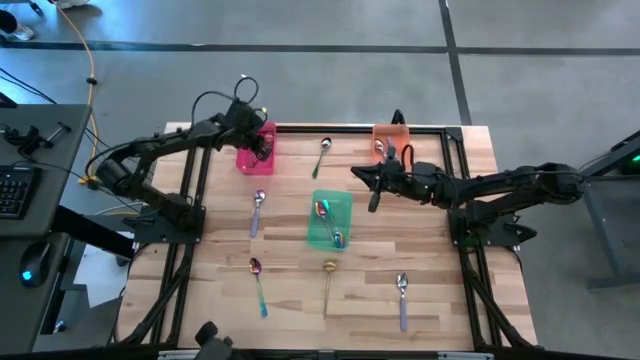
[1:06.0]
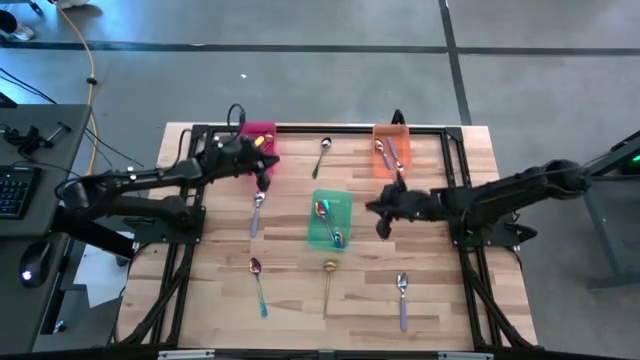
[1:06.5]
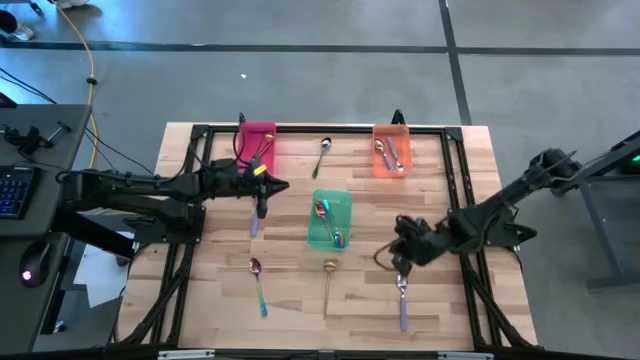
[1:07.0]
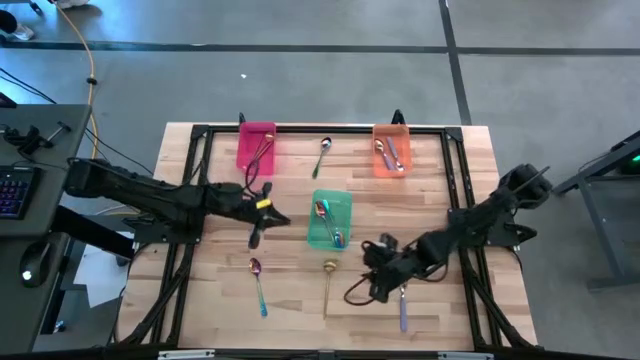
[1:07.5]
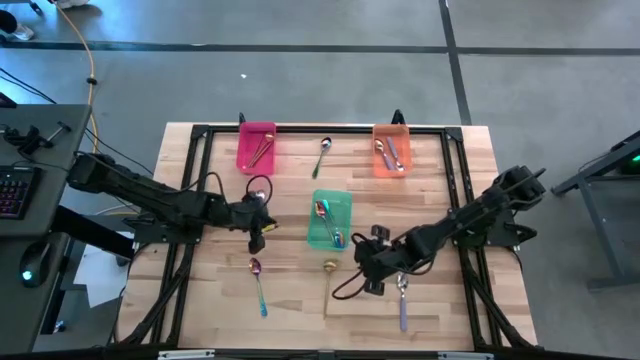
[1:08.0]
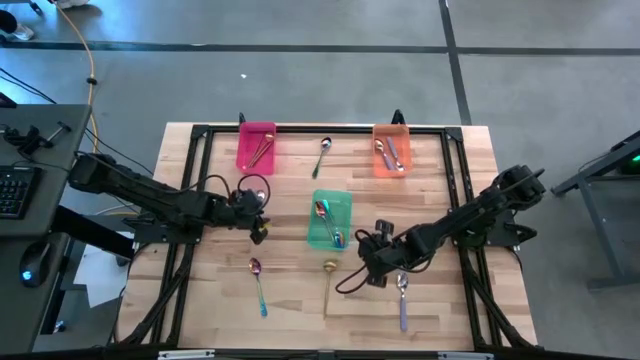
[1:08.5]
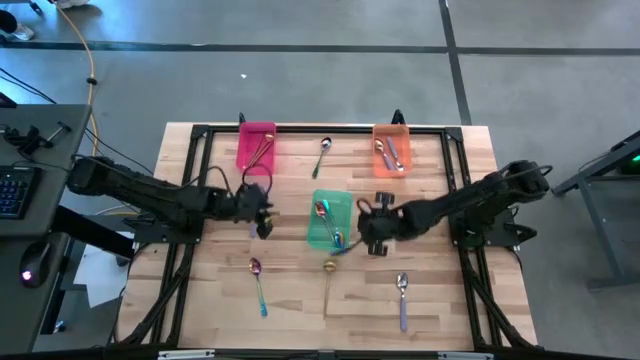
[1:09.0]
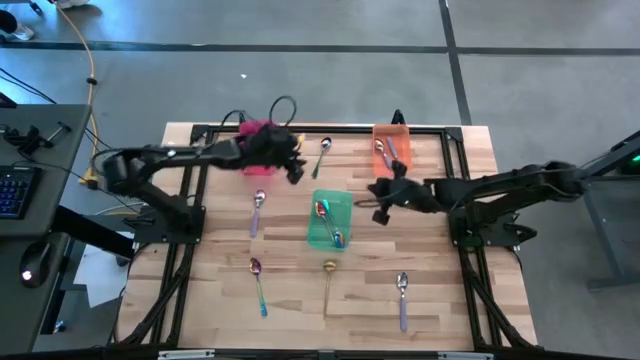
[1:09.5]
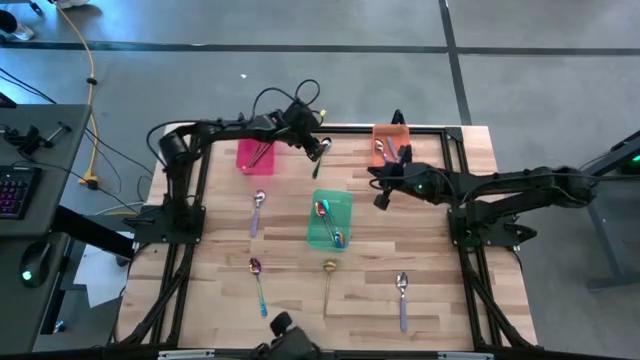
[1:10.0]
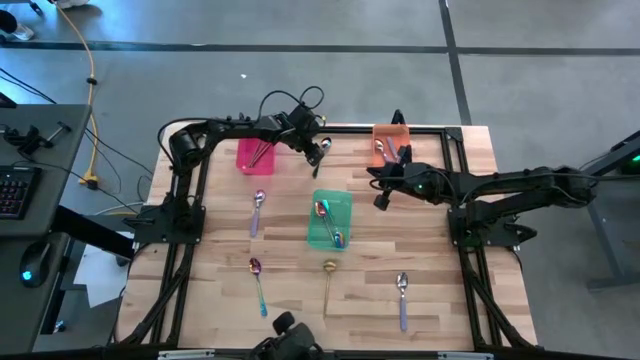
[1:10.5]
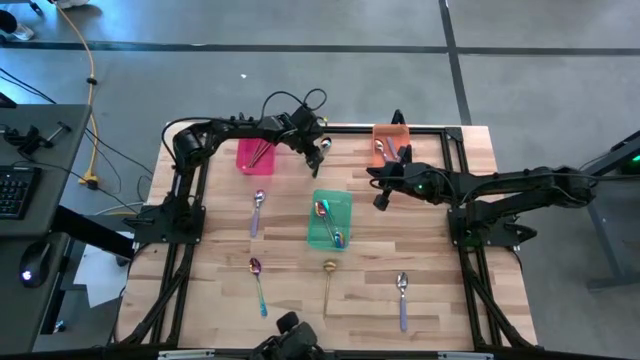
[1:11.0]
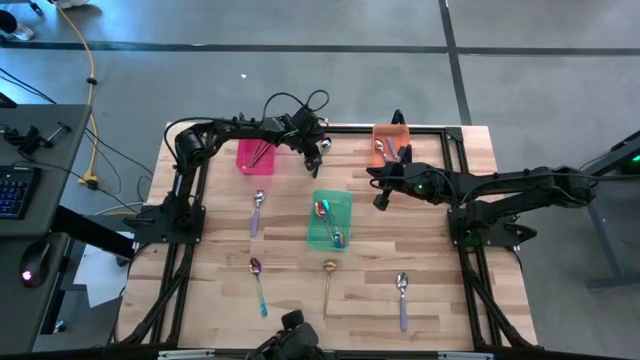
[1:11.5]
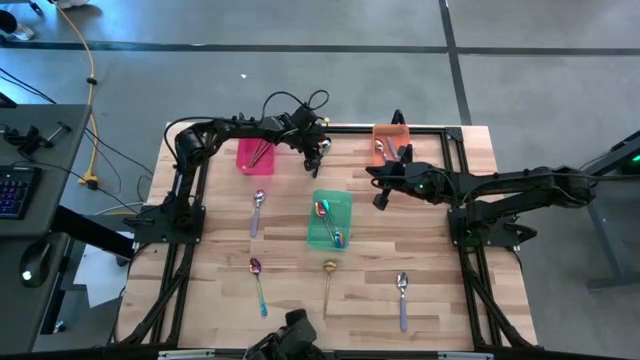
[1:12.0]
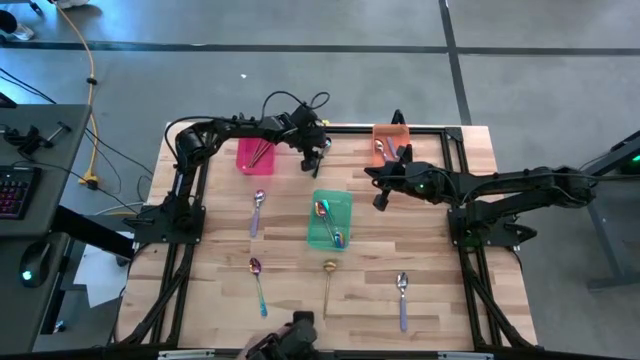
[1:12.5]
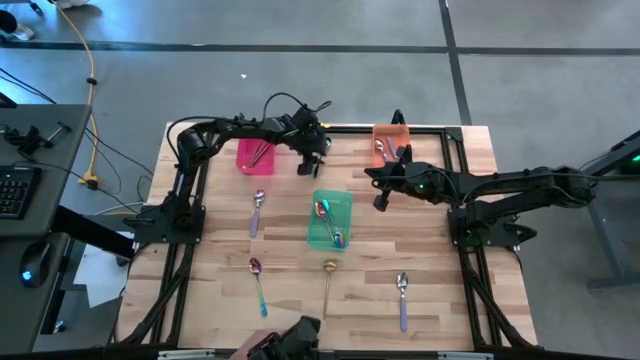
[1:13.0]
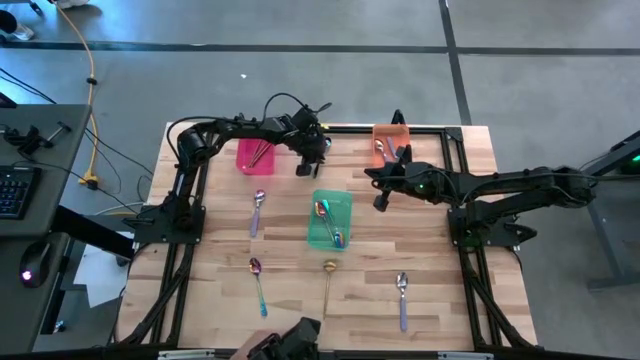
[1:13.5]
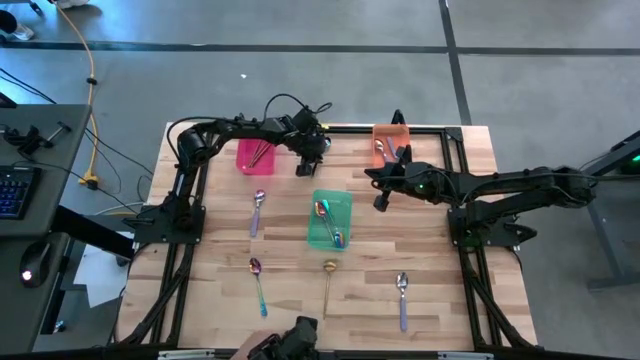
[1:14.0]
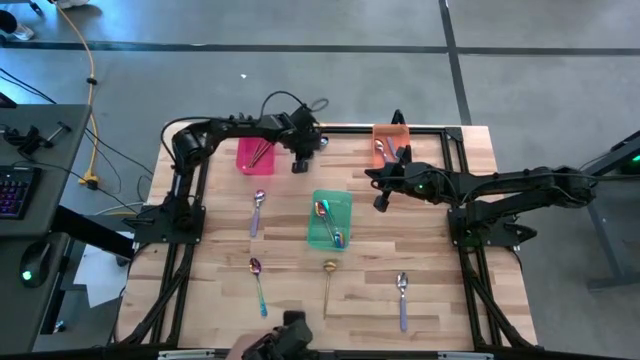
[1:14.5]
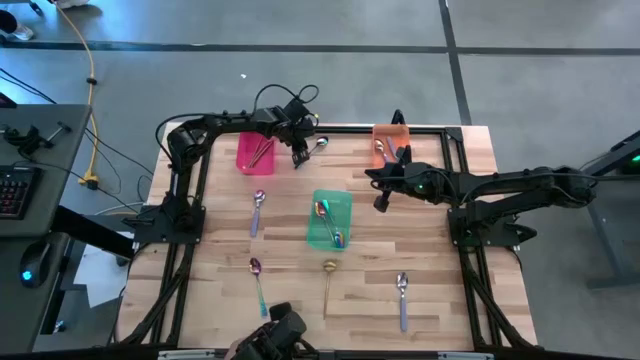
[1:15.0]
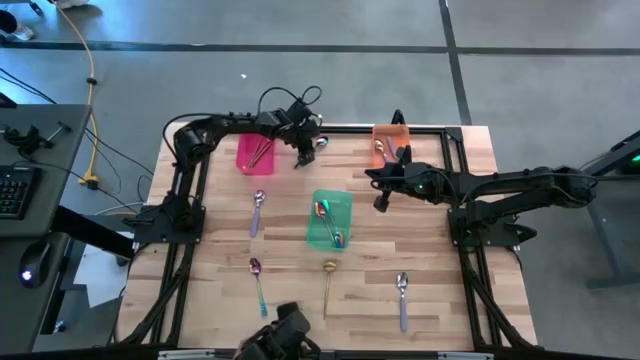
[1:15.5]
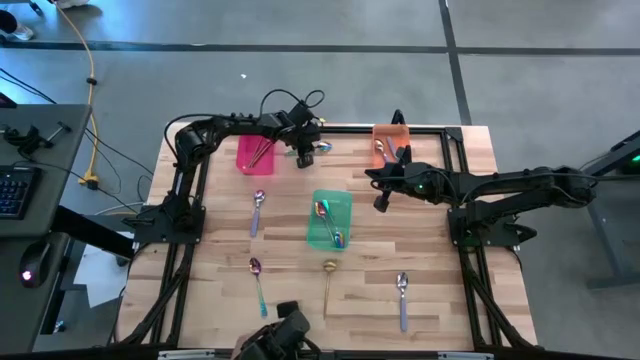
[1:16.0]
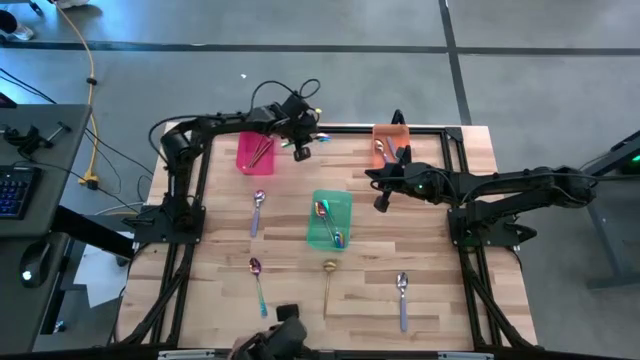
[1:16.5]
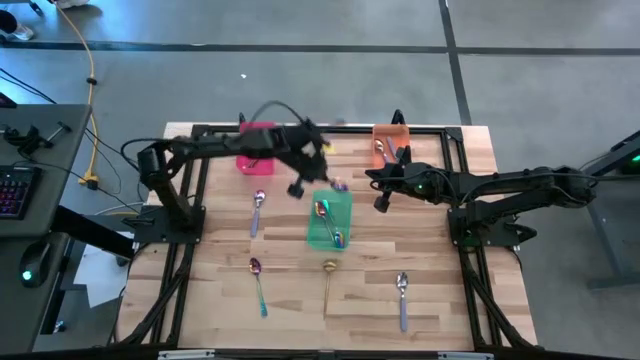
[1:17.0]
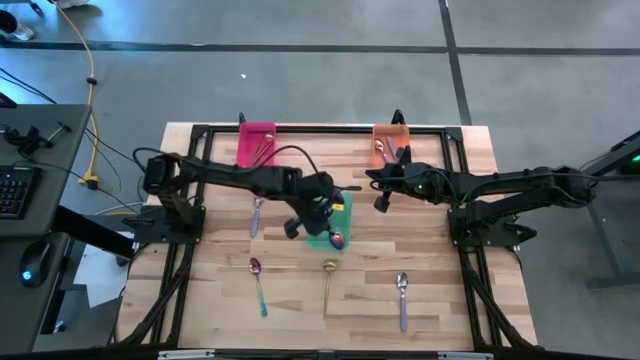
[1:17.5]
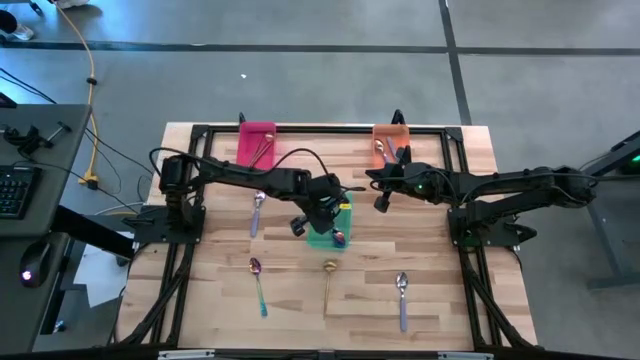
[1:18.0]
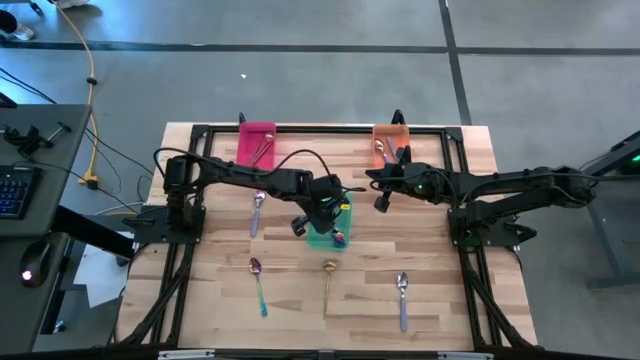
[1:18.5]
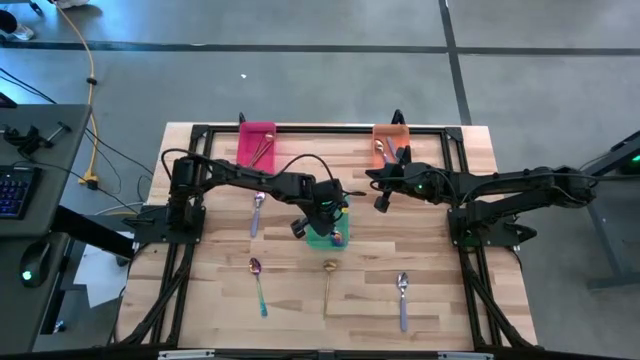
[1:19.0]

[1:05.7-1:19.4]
Task: Sort silverware by color (type)
Put the top blue spoon into the green bin

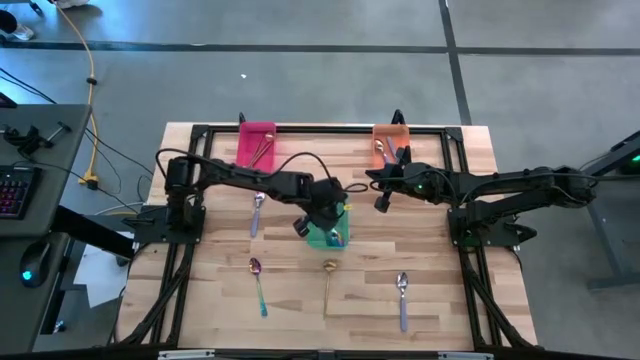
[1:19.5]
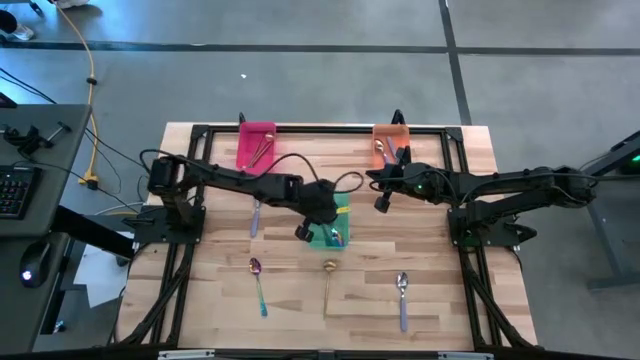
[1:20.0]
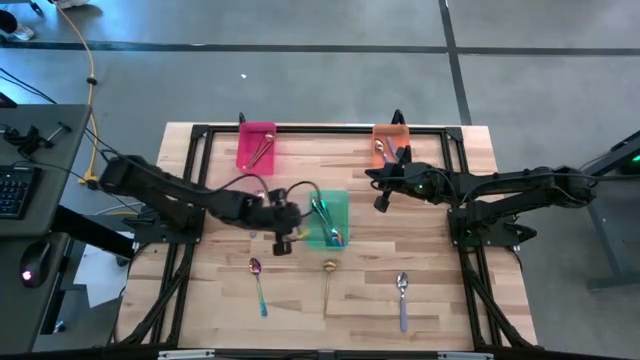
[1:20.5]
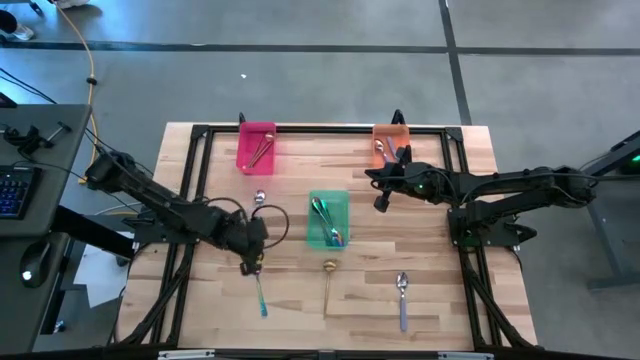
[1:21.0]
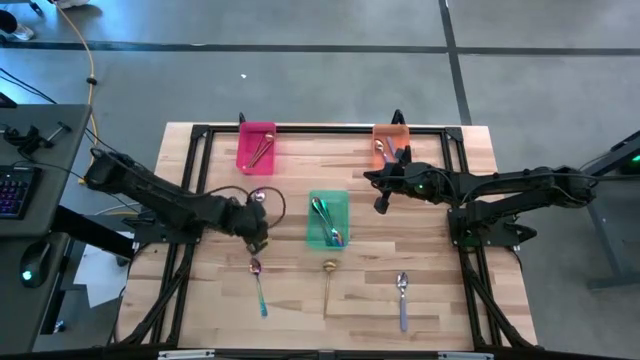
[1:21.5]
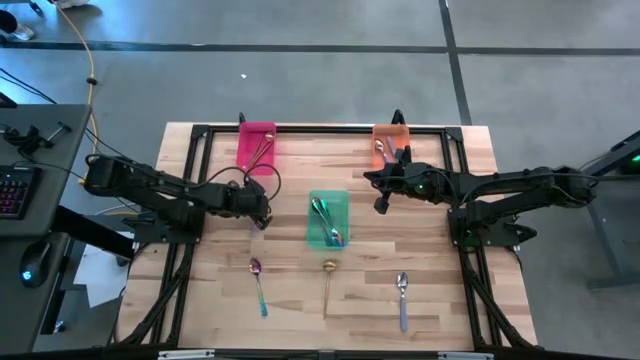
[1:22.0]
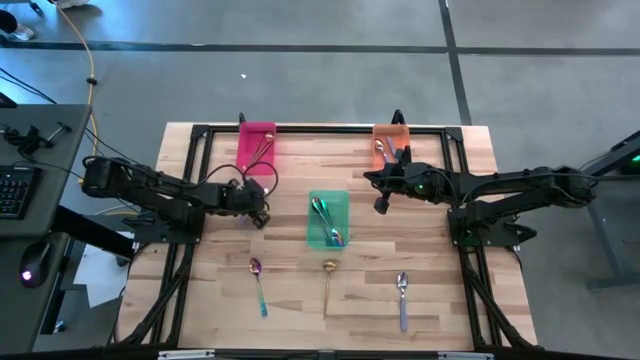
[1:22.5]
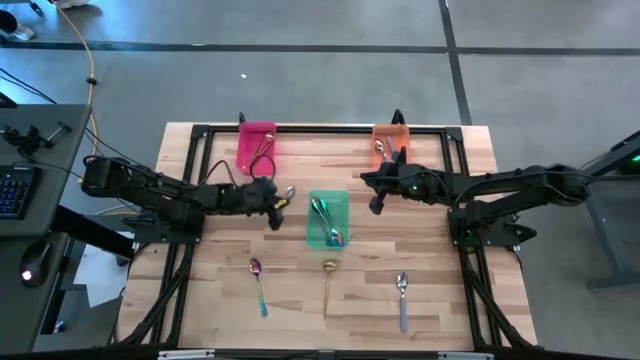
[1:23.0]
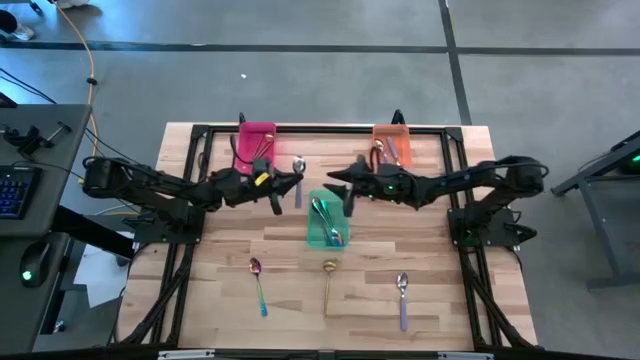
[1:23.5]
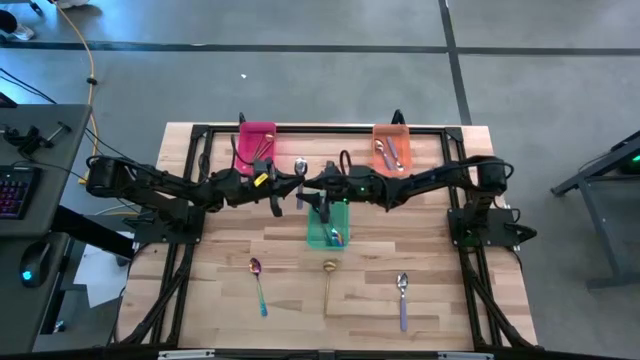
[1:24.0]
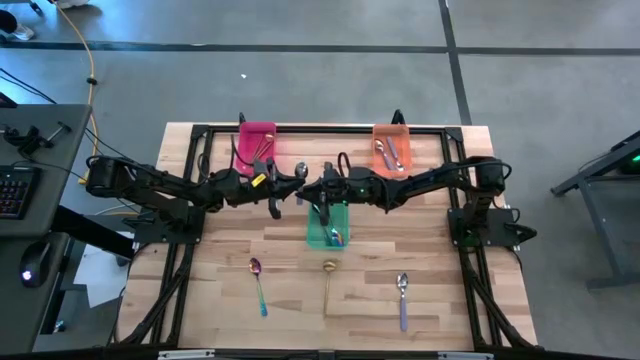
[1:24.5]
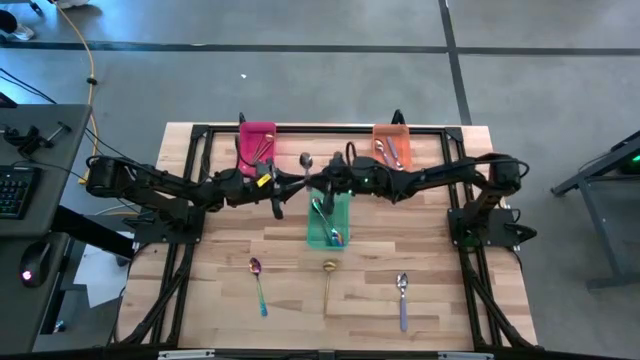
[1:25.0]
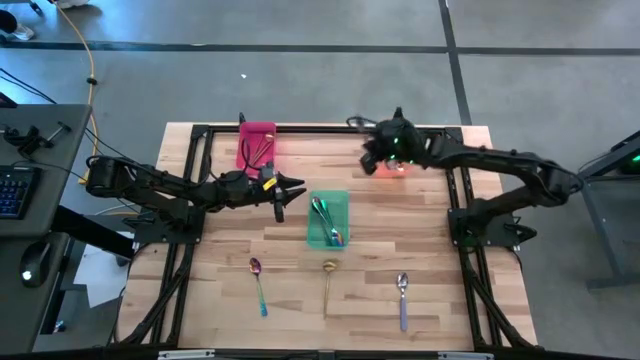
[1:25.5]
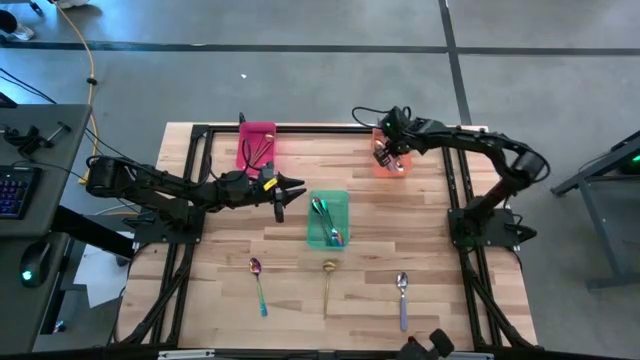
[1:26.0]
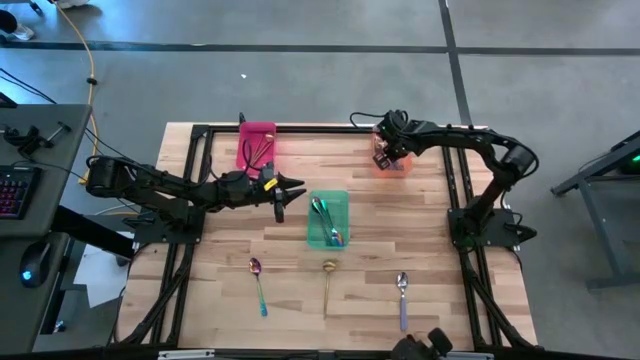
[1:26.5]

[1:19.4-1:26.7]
Put the top purple spoon into the orange bin
